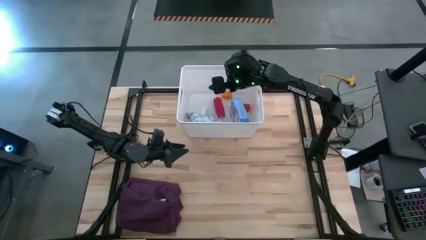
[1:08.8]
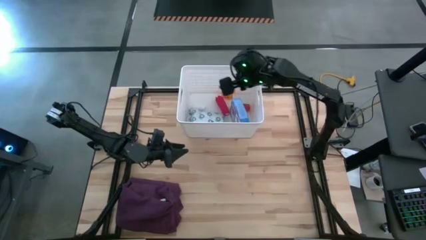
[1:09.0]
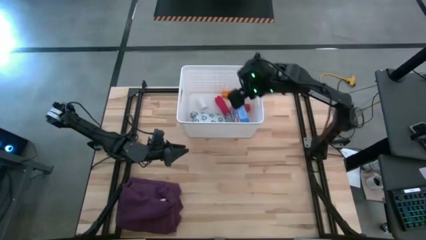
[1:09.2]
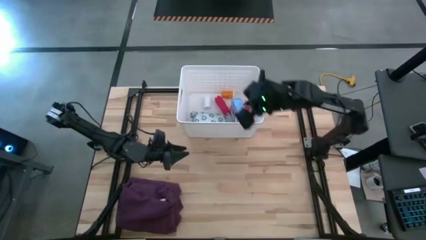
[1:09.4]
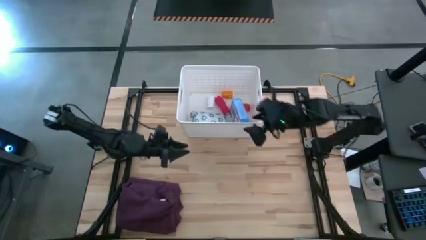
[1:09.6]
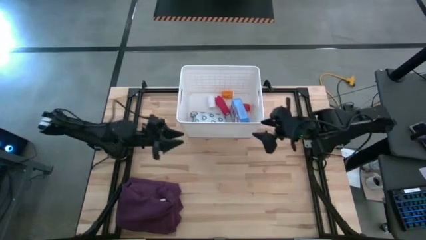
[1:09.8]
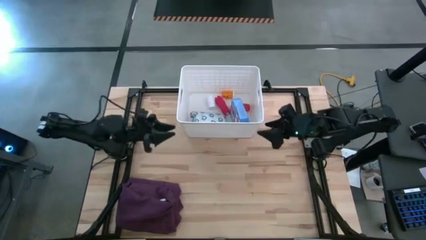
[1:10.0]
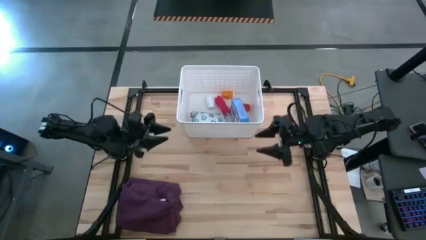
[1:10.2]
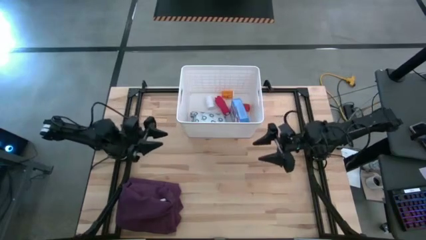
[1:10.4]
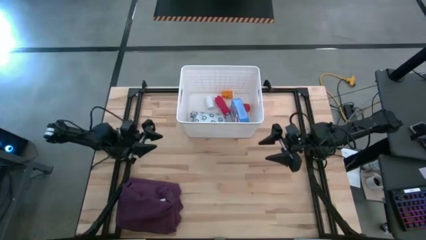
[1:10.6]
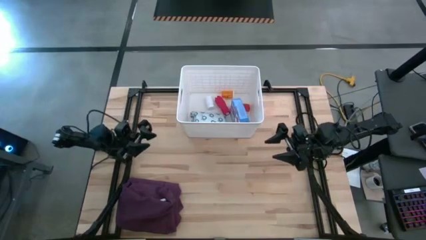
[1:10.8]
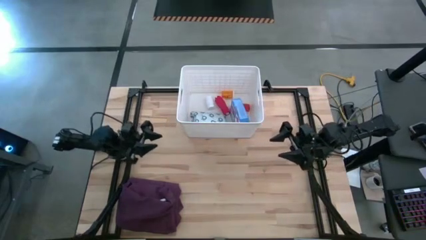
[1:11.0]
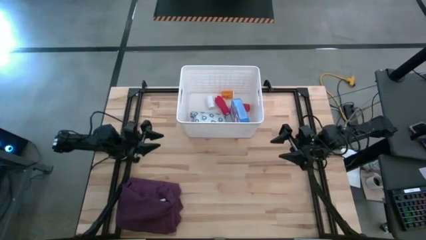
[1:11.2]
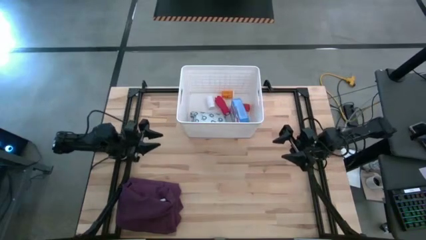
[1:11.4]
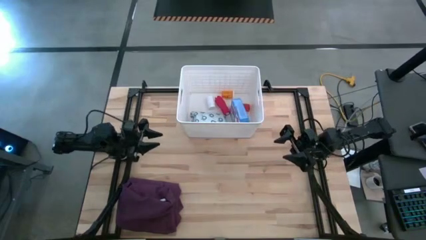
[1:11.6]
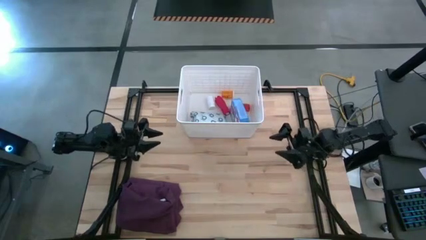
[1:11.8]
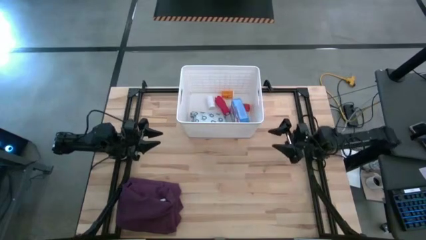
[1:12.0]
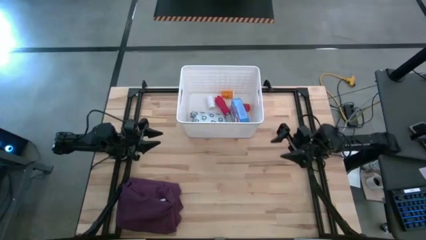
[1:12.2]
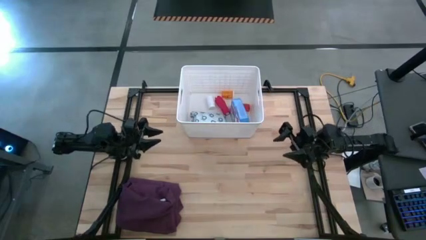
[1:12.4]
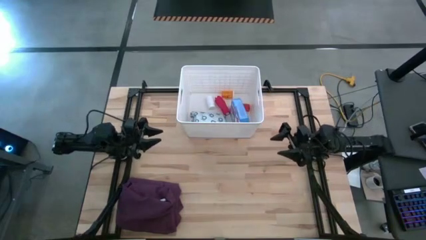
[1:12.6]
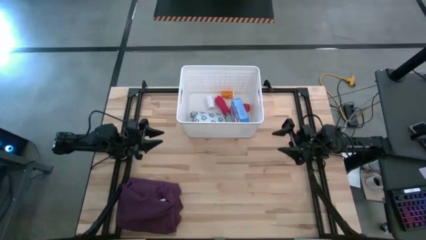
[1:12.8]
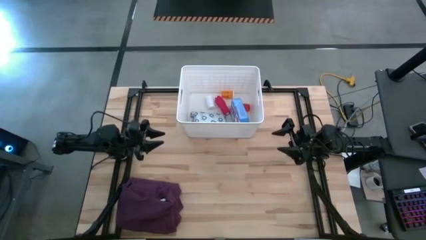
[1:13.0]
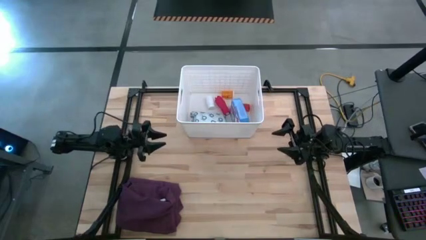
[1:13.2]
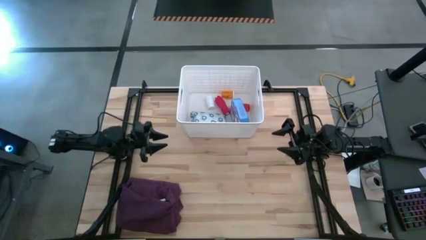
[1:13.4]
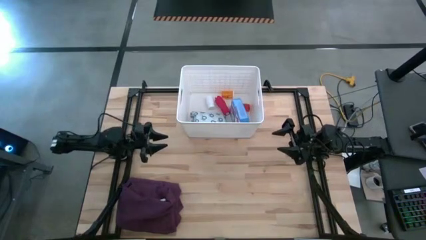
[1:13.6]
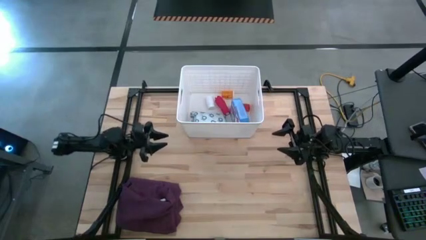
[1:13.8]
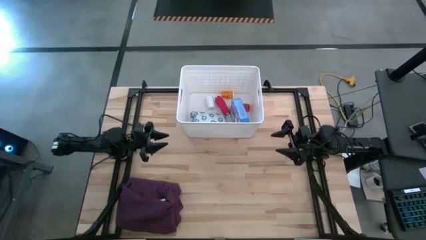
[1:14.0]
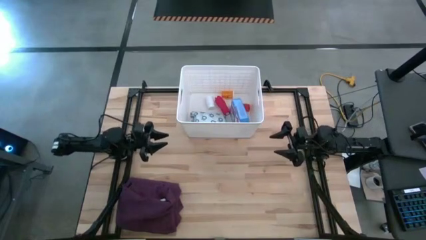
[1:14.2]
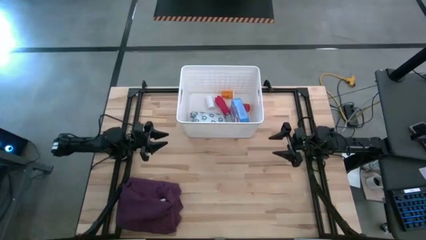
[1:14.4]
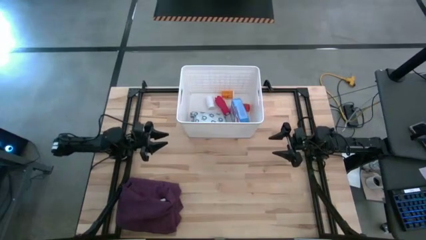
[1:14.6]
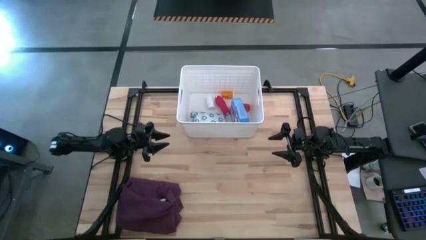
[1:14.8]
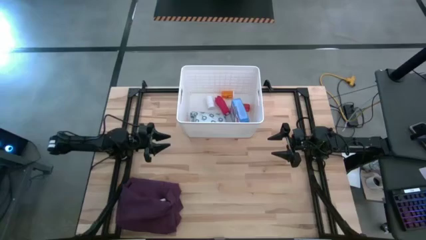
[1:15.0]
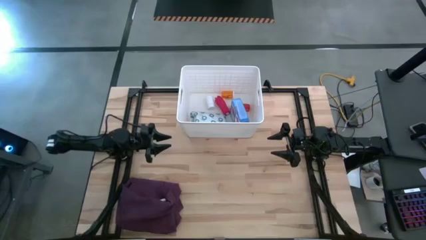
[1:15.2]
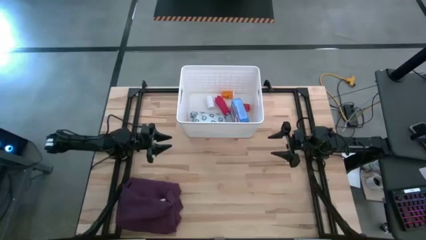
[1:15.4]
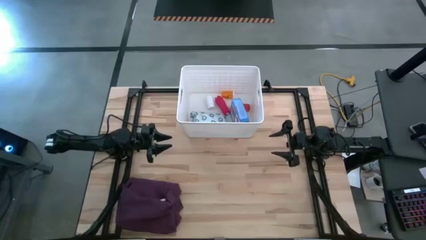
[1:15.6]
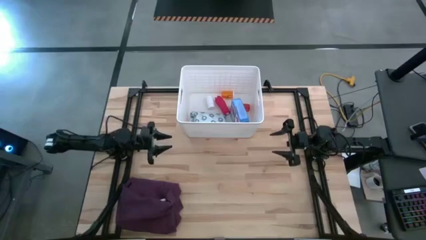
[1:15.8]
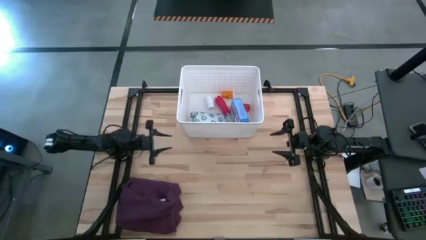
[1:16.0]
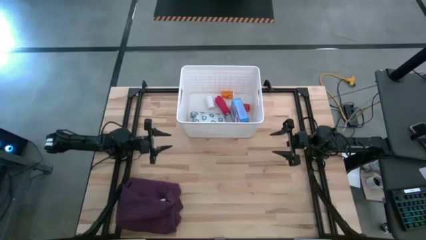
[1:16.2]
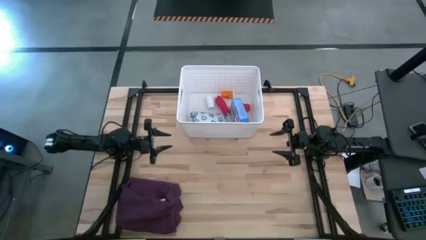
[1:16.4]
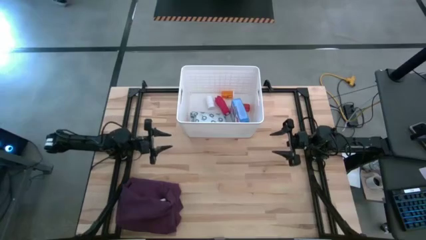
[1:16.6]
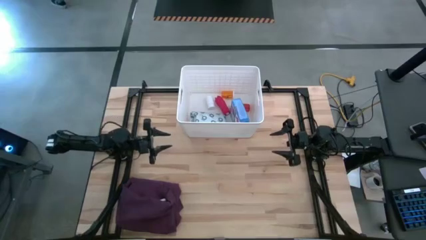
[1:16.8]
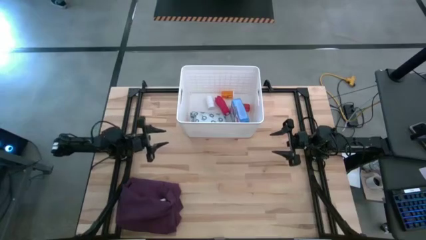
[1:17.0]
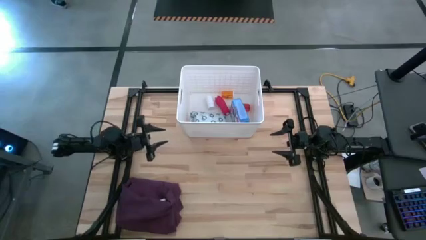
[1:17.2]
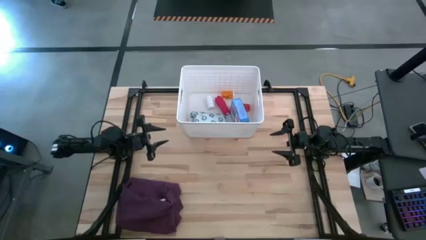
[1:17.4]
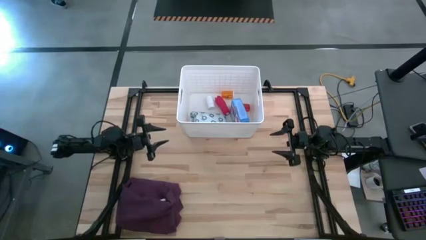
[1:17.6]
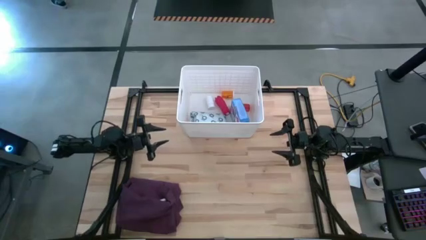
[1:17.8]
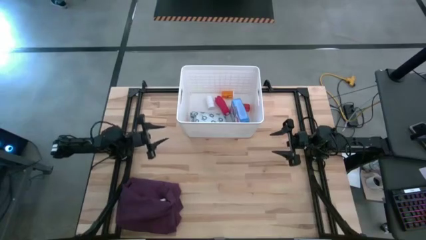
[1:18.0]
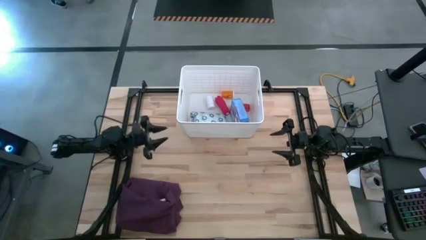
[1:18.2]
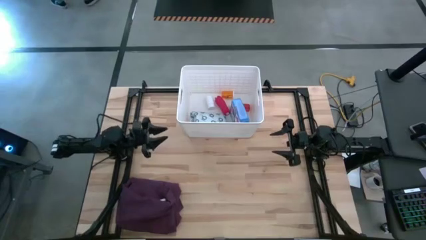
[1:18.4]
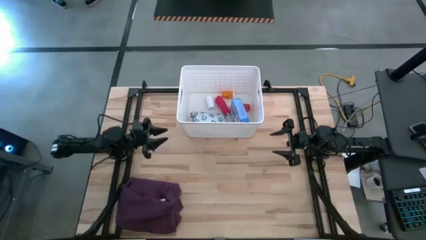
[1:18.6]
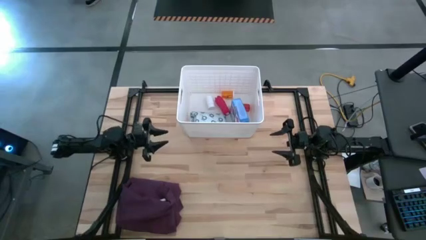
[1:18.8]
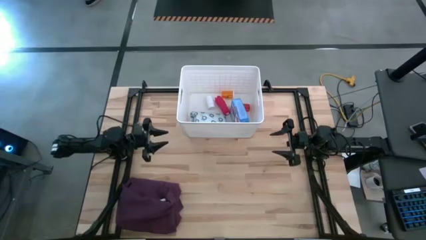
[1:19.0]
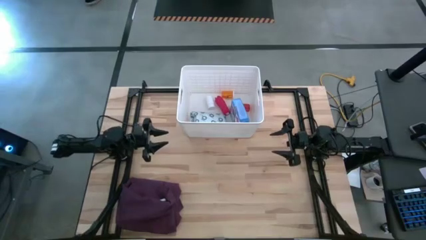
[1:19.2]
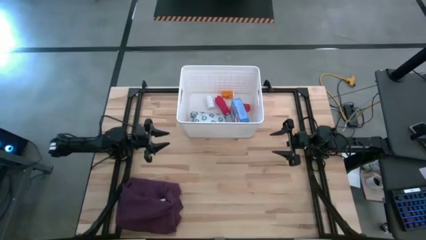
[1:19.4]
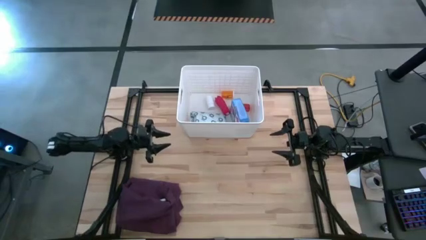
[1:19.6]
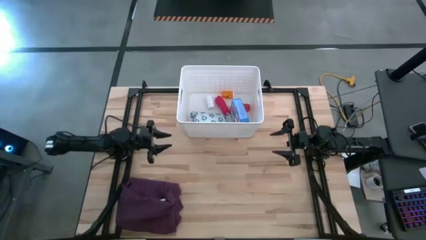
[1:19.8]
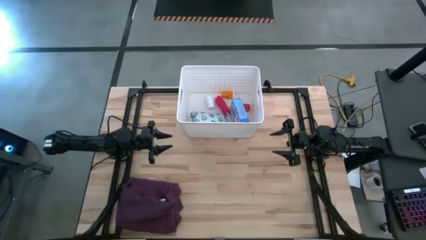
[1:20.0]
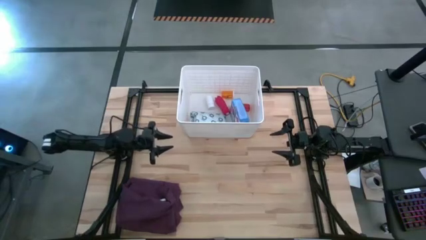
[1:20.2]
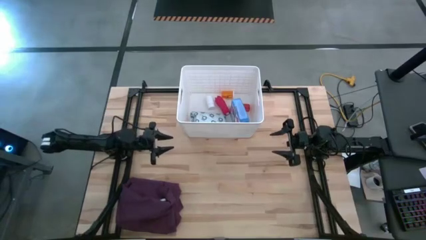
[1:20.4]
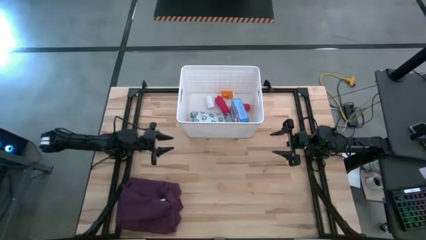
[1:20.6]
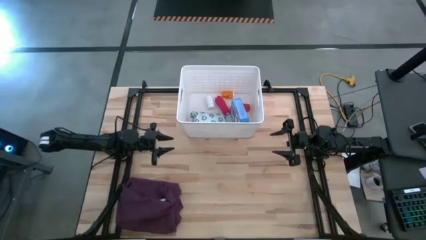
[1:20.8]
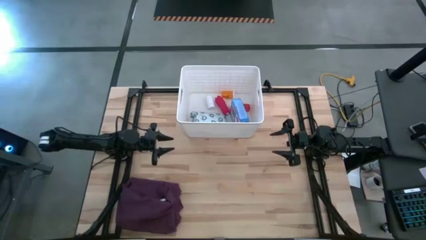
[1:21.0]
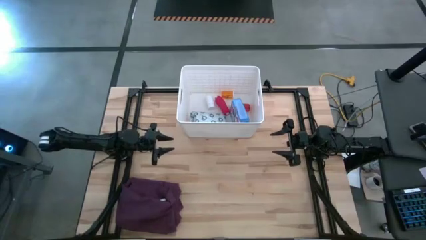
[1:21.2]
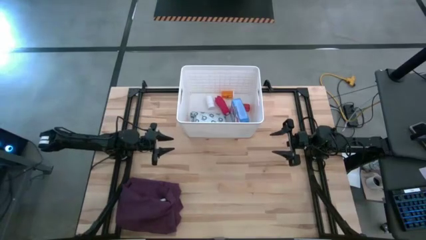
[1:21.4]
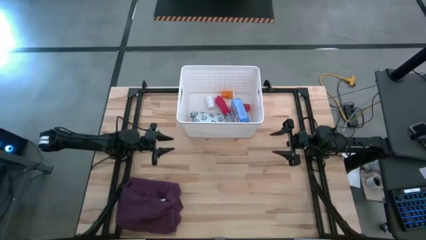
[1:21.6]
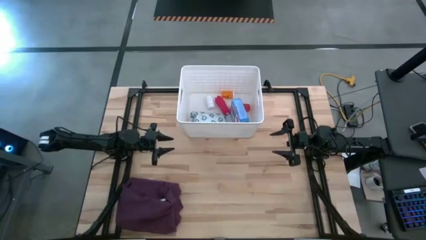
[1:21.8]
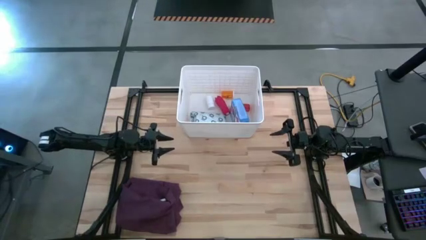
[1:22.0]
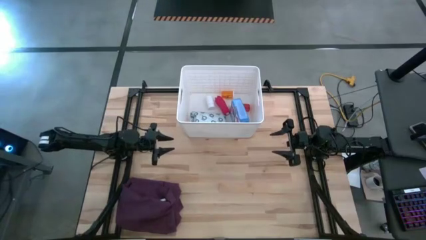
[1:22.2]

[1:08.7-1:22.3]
Task: Pick & place medical supplies in basket/bin
Return to Home Position
